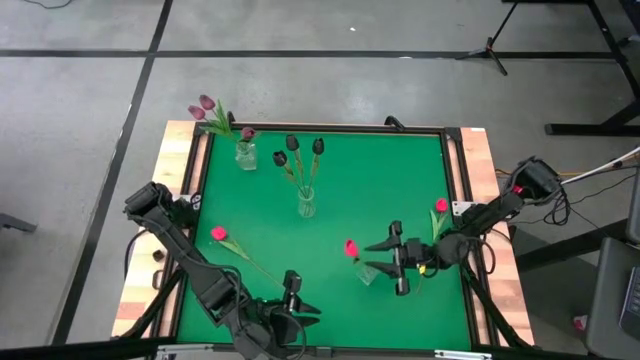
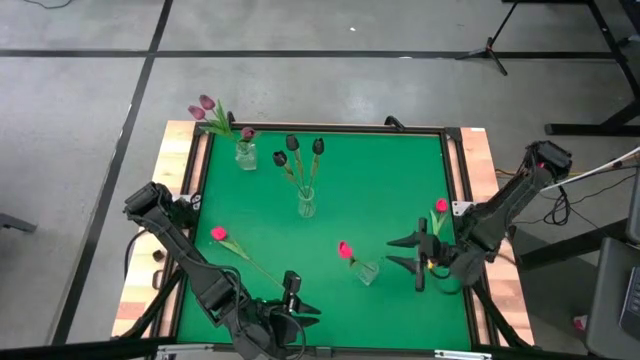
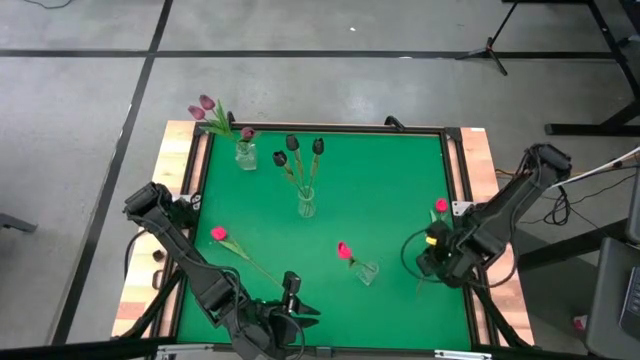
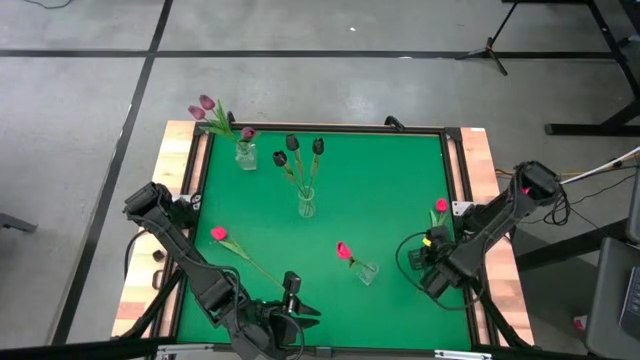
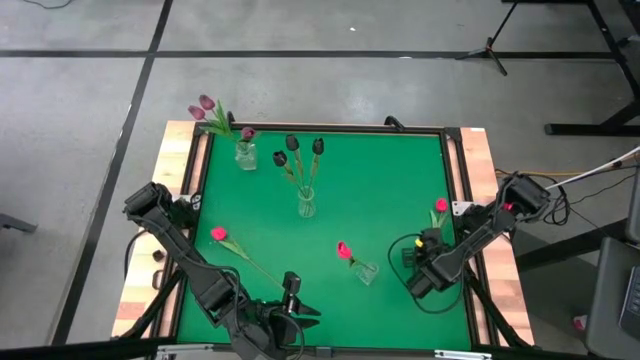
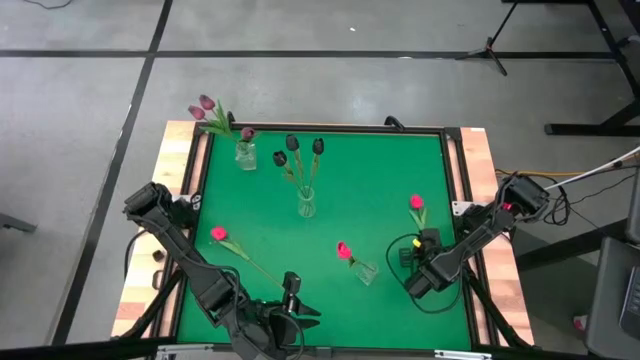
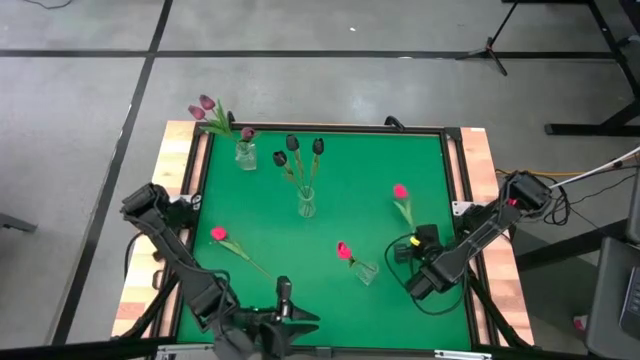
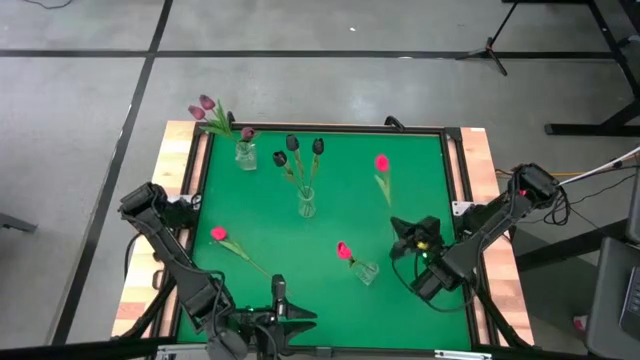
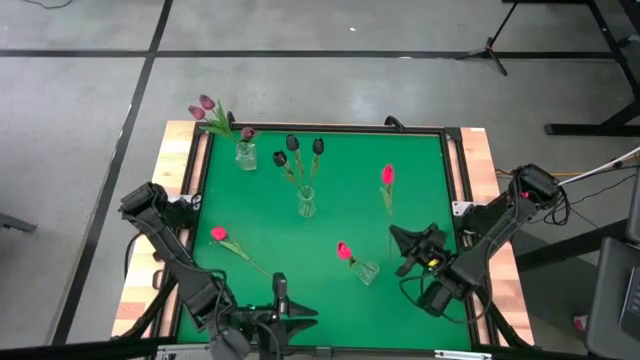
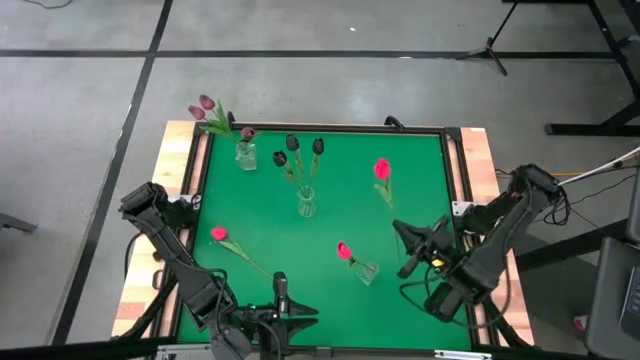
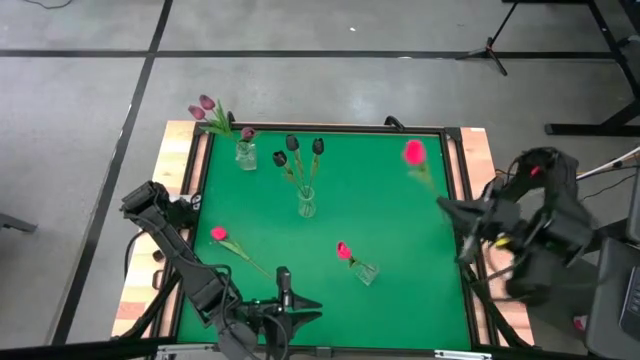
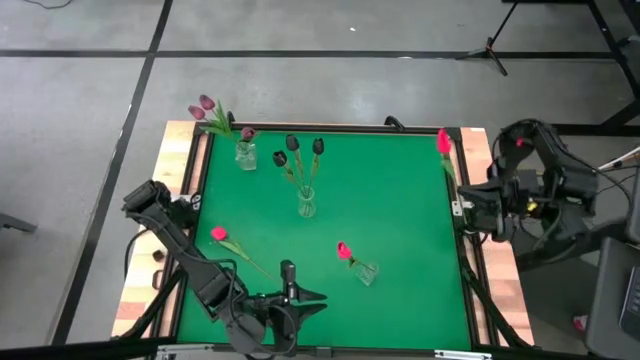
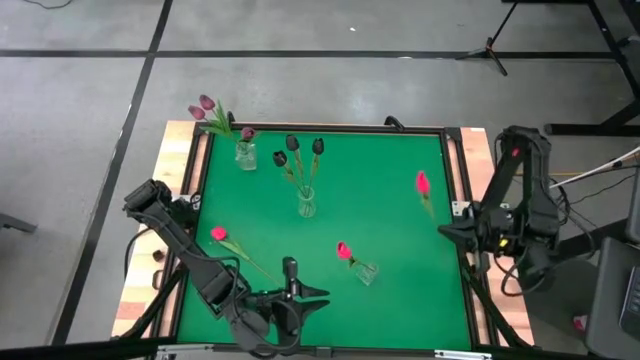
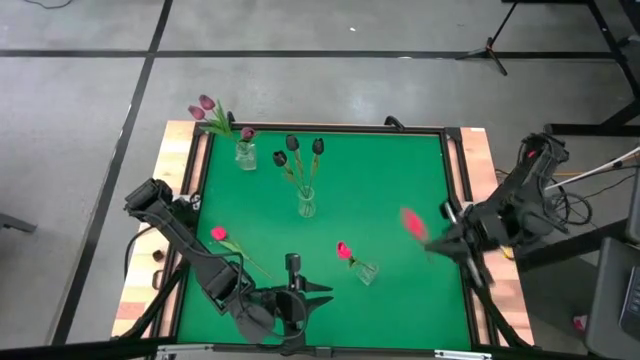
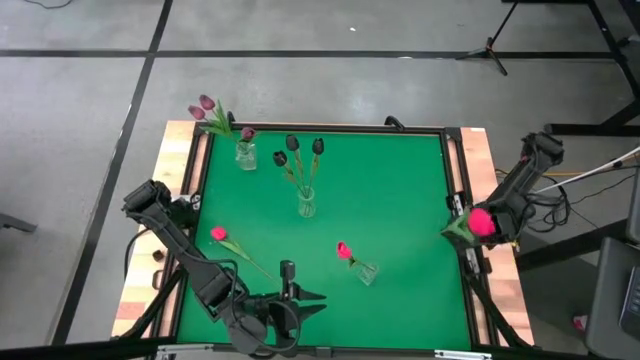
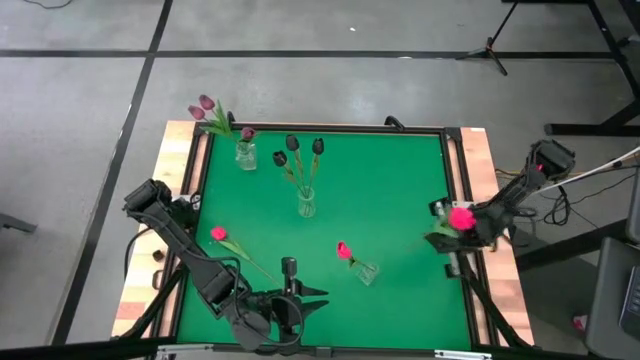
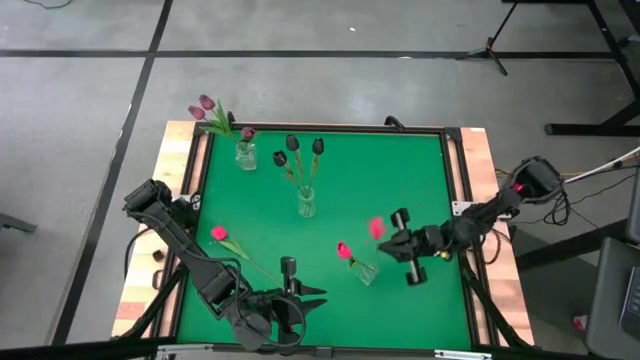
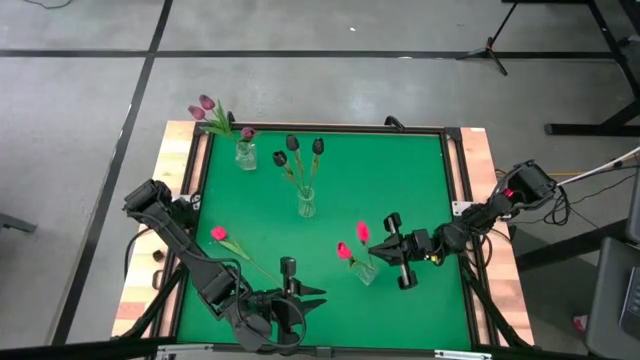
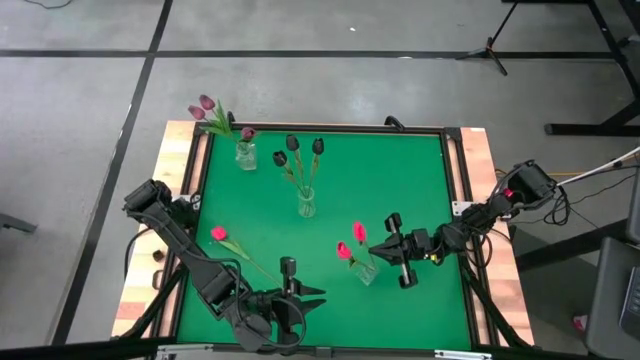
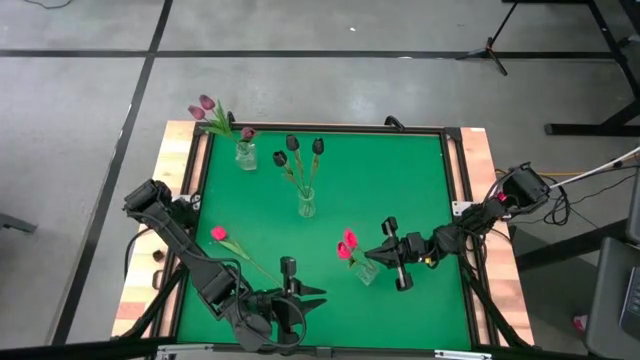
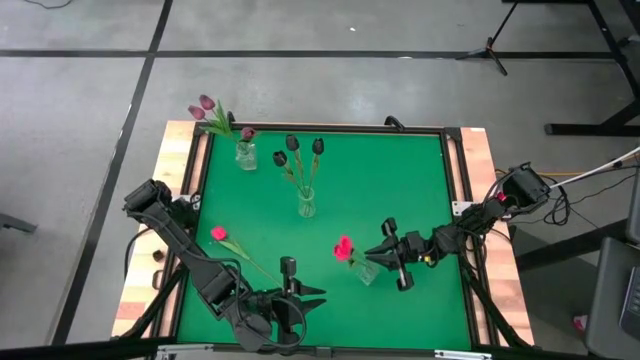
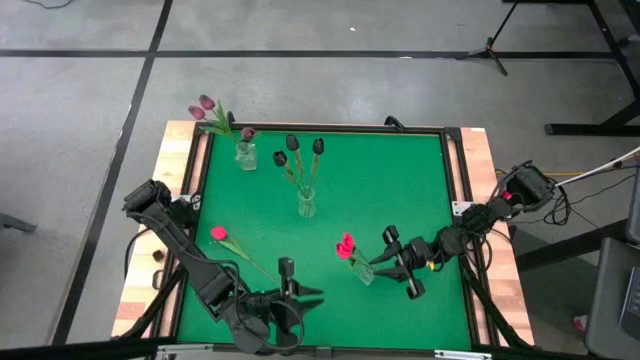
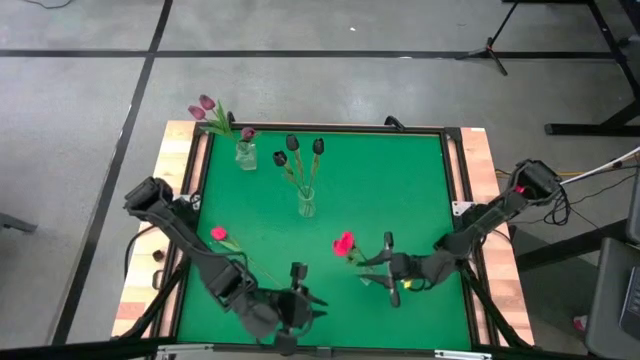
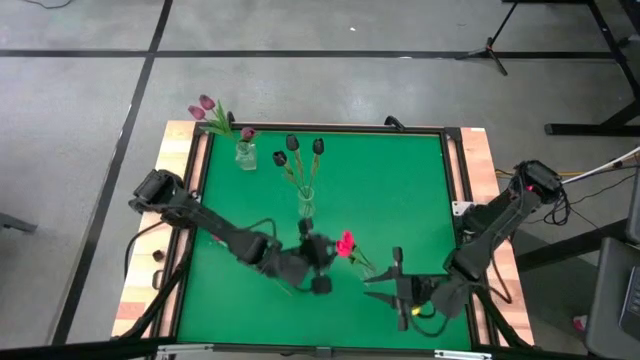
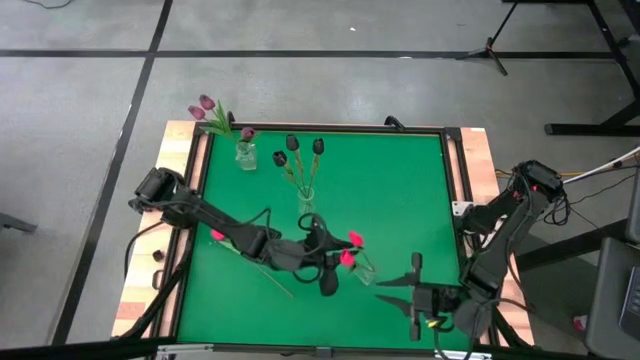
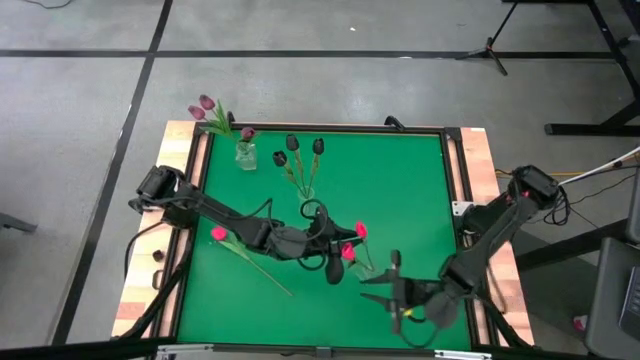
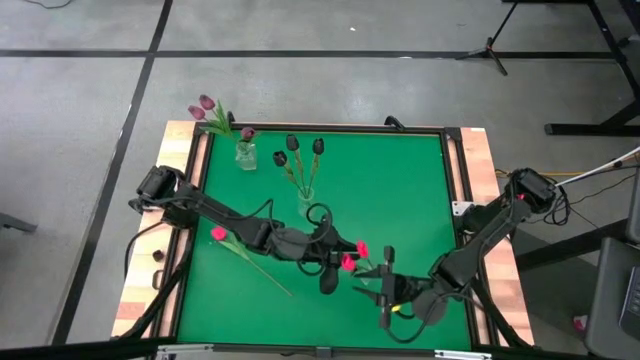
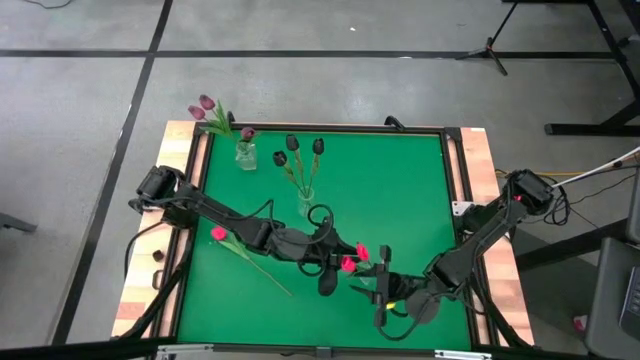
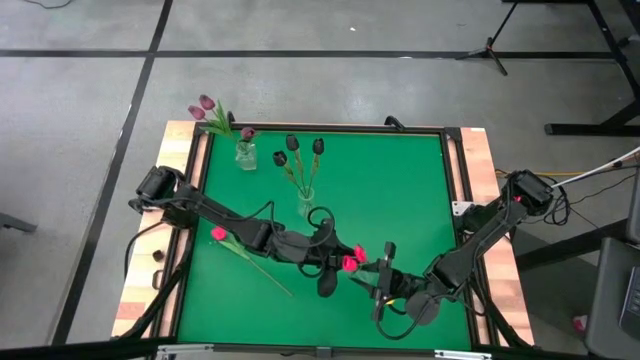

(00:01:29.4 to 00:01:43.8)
Task: Sort flowers into vase by color
Put the right pink tulip into the bottom transparent vase

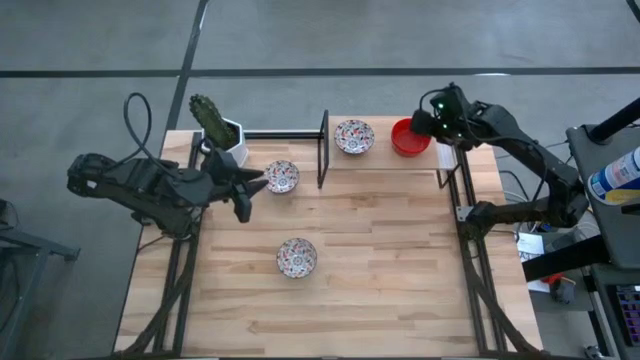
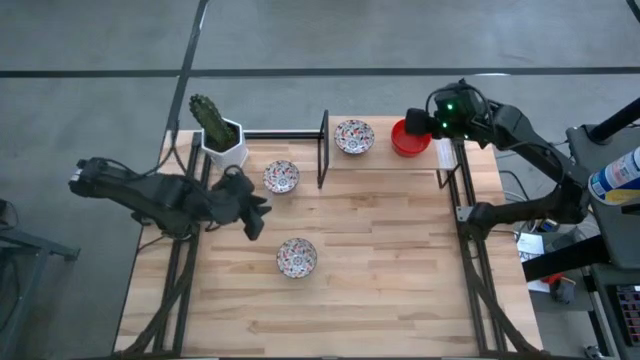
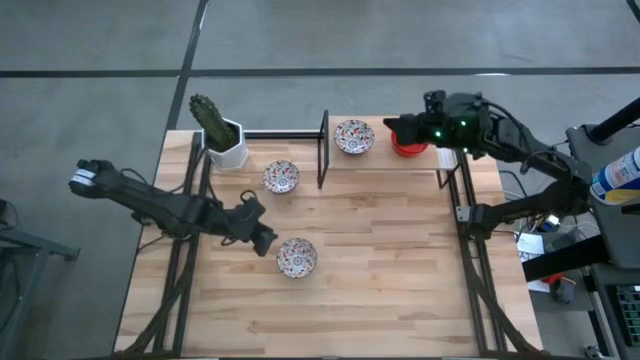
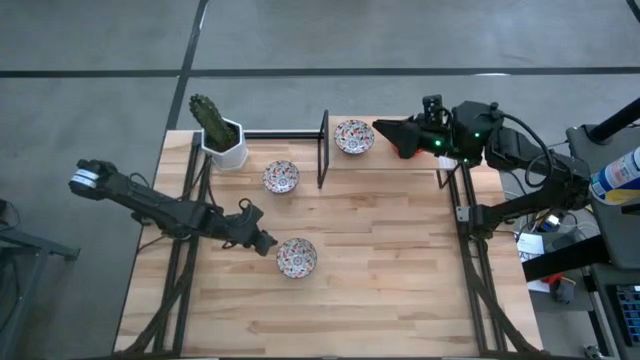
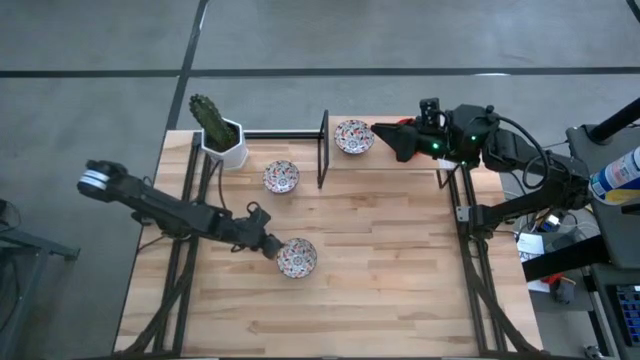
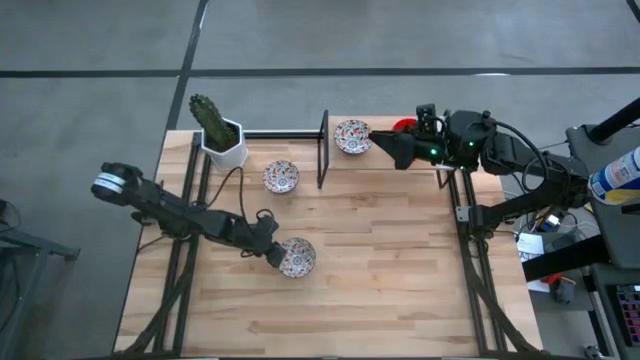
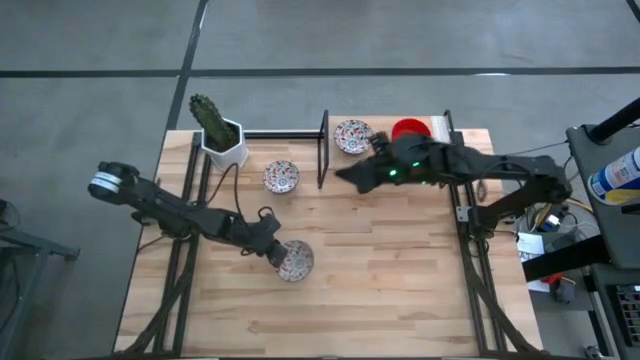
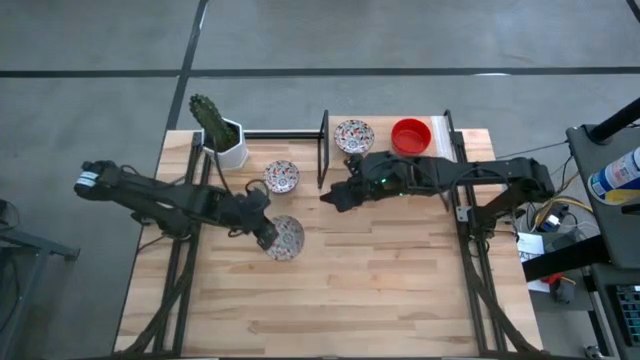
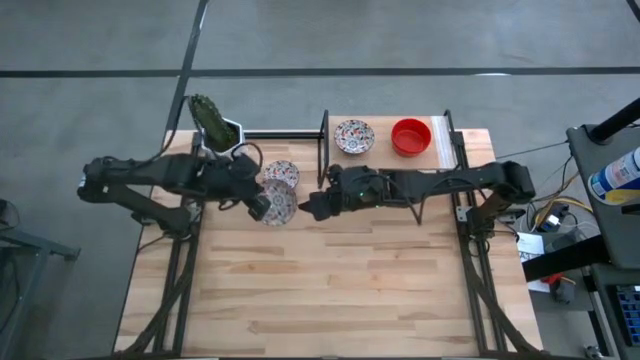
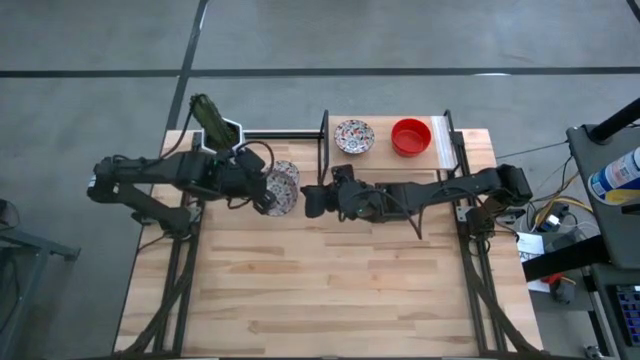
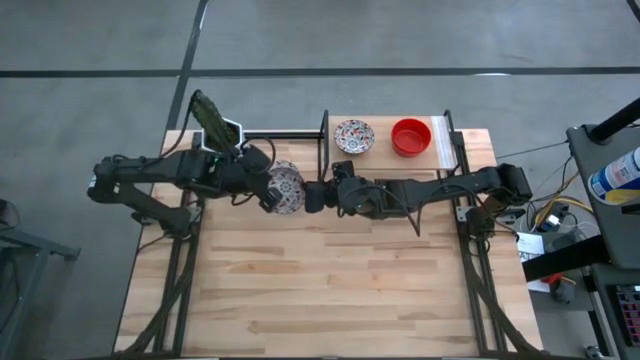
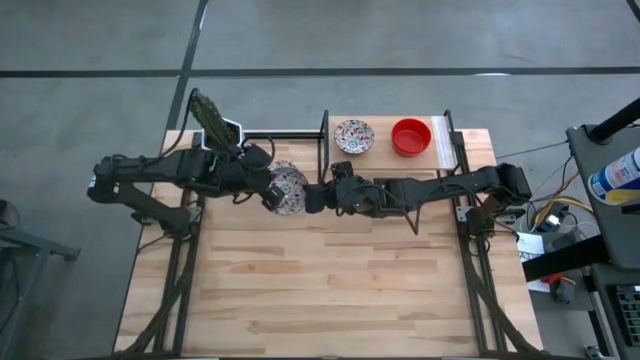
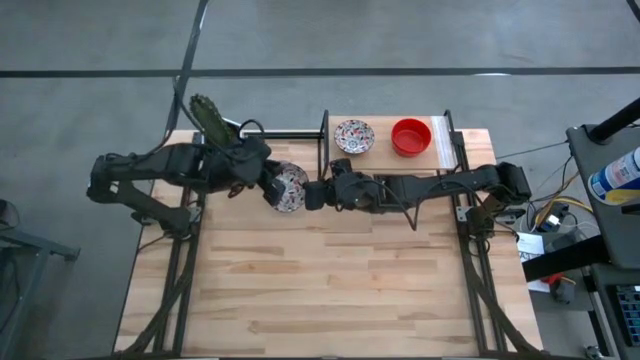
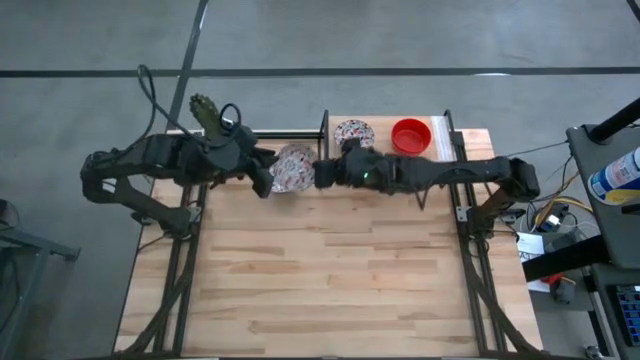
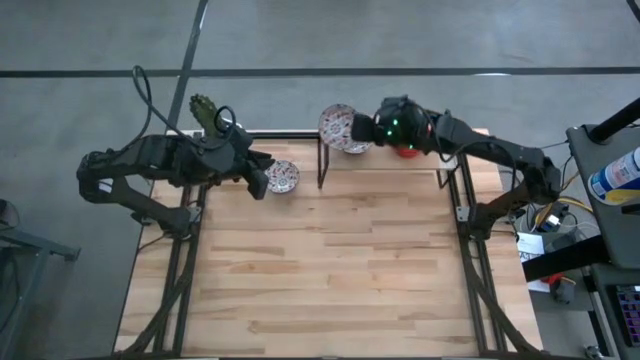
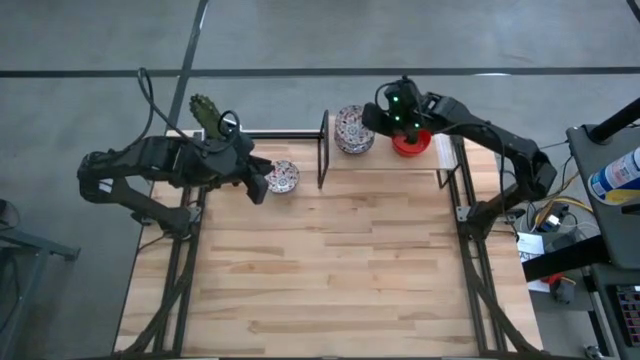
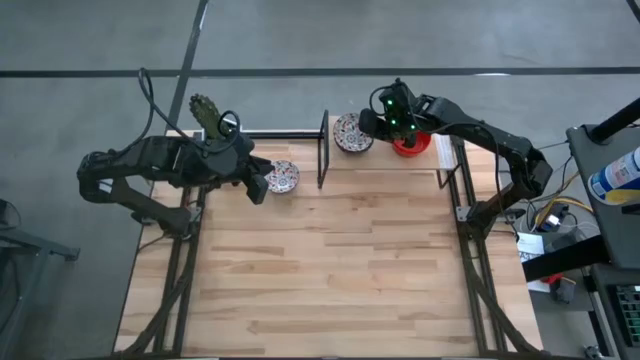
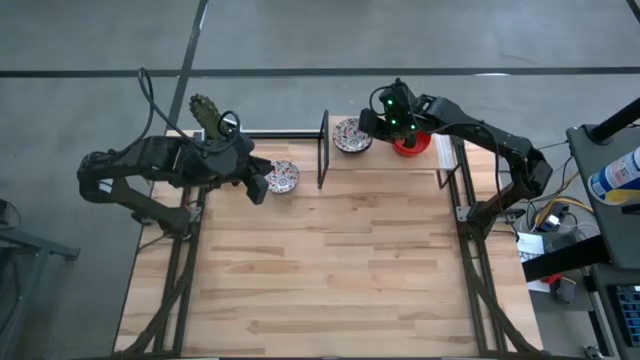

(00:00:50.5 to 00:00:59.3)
Task: Pick & Place Mini bowls
Stack the white patterned bowl on top of the other white patterned bowl on the shelf
